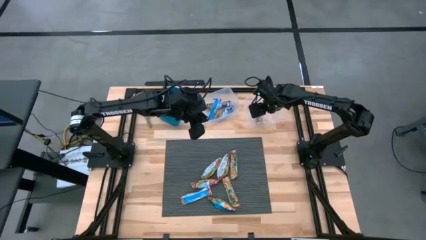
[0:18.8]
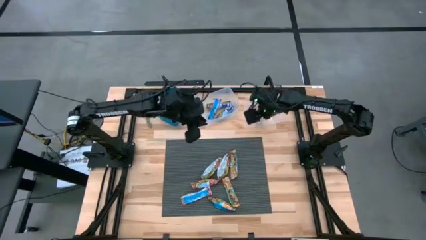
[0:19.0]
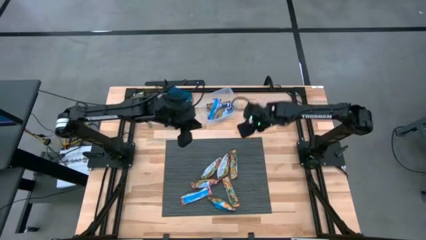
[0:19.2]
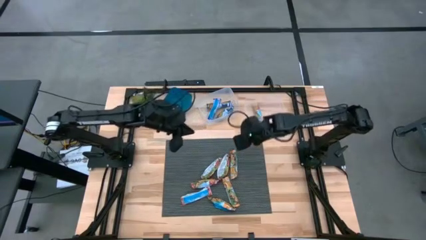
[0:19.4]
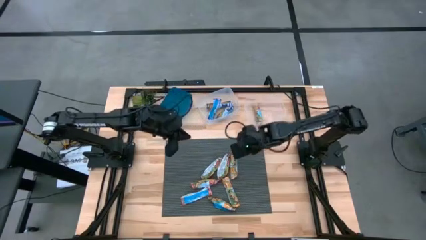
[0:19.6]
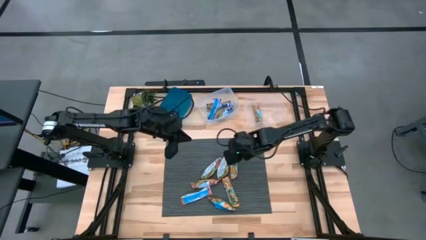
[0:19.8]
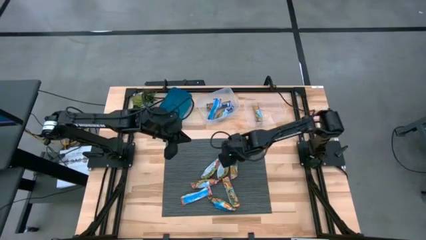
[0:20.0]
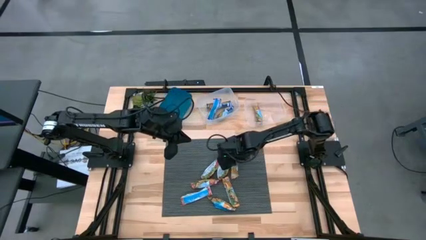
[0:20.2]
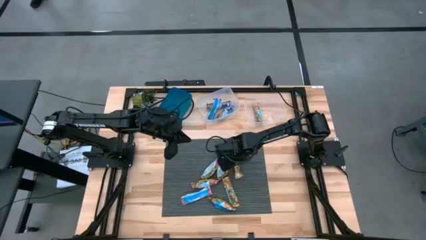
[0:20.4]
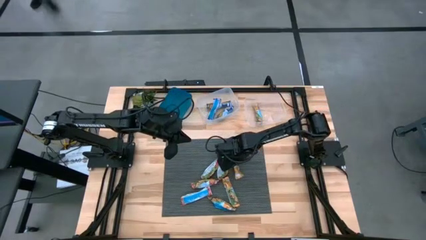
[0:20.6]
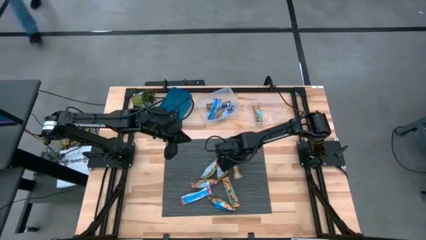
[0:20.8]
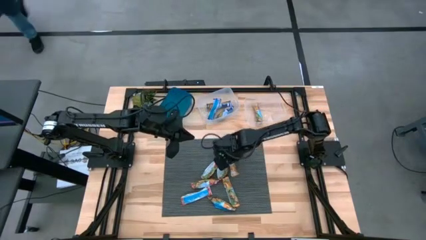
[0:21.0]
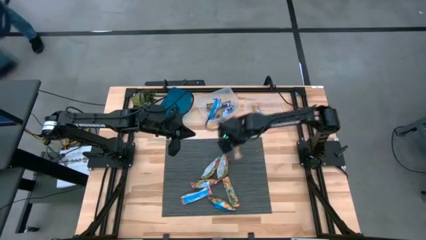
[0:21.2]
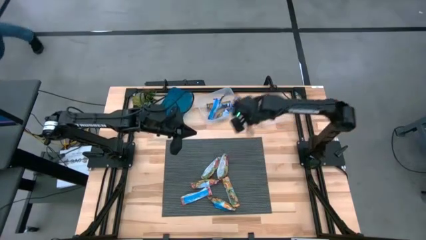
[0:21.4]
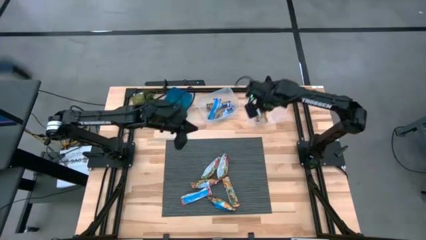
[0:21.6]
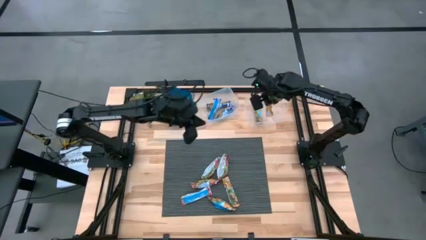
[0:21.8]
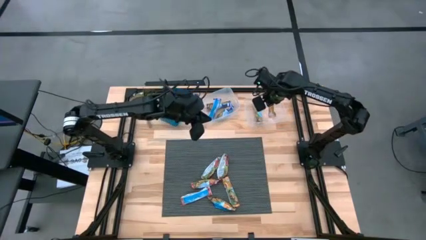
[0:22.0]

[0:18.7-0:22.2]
Task: Pick and place Granola Bars by type
Put the yellow granola bar into the right transparent bin

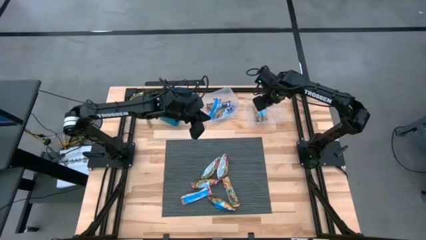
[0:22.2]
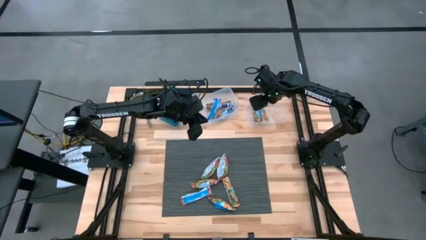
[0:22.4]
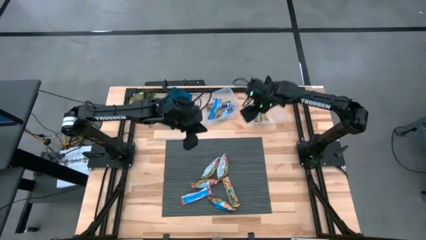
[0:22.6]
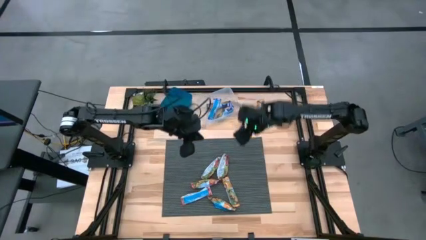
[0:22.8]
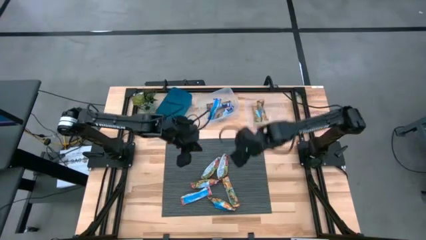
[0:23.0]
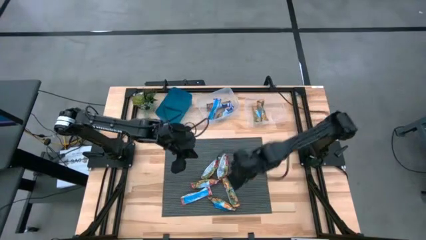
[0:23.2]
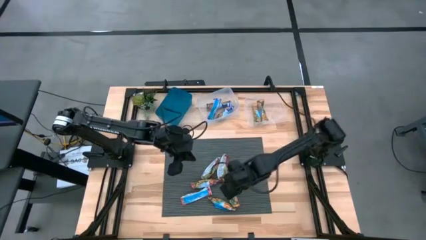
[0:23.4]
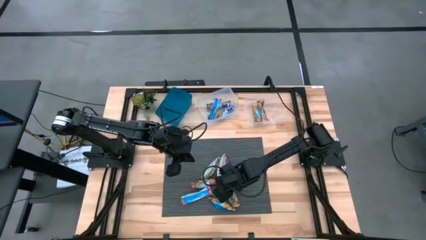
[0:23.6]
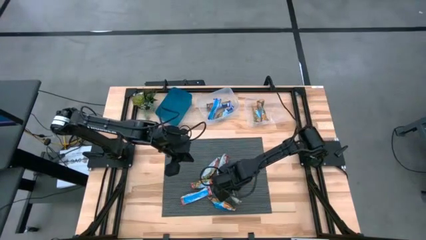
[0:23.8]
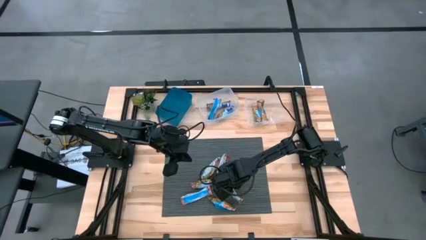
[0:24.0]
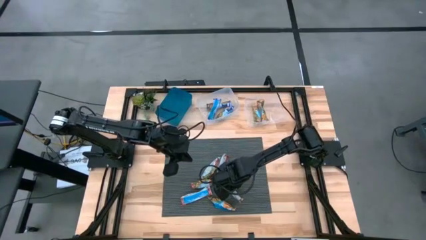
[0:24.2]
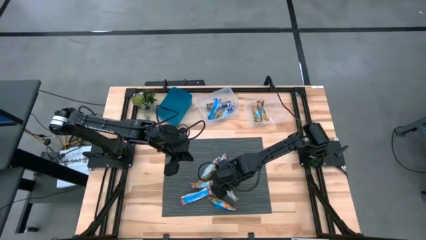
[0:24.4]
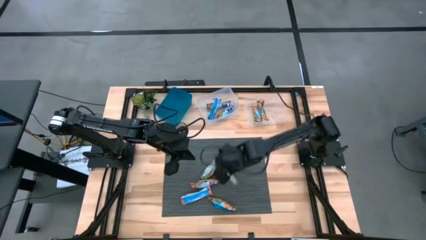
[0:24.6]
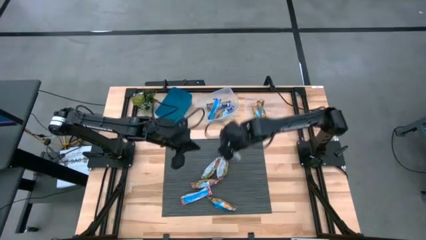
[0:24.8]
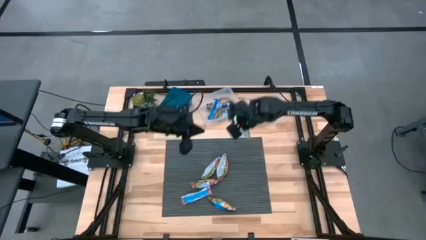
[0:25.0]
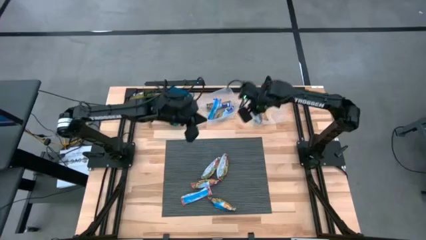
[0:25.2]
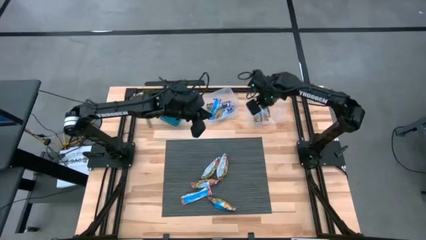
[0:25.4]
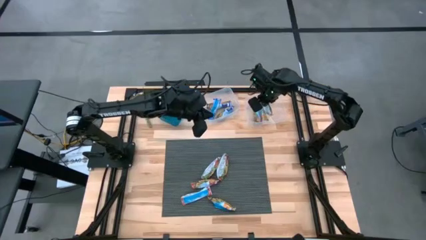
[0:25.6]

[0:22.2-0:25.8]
Put the yellow granola bar into the right transparent bin

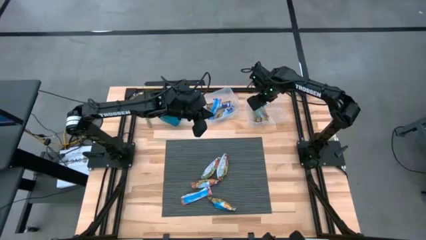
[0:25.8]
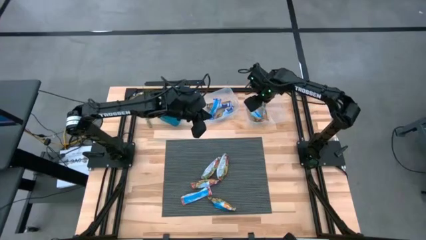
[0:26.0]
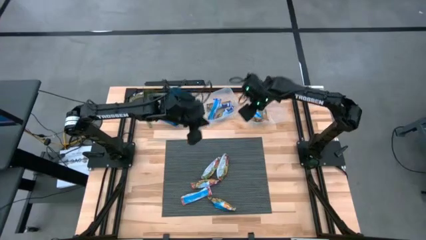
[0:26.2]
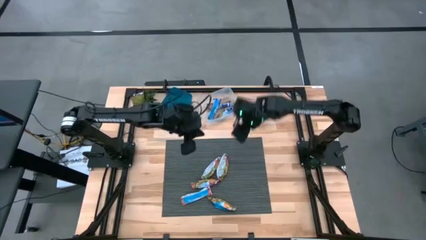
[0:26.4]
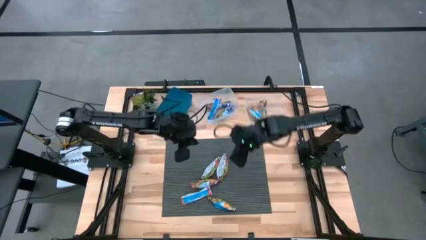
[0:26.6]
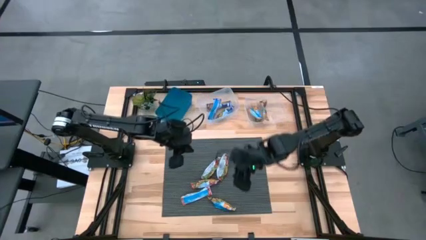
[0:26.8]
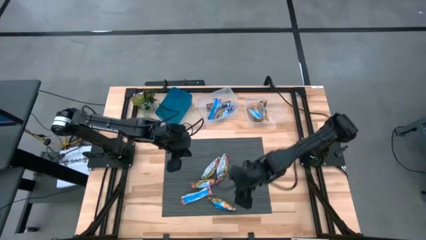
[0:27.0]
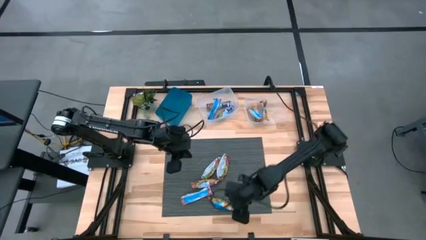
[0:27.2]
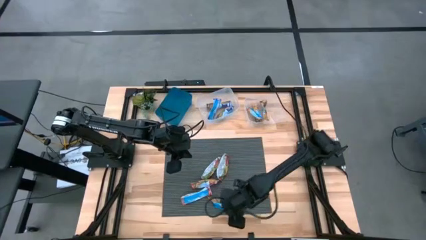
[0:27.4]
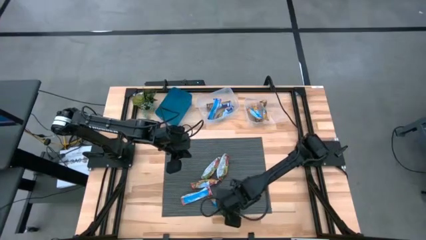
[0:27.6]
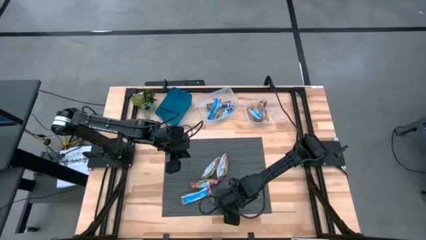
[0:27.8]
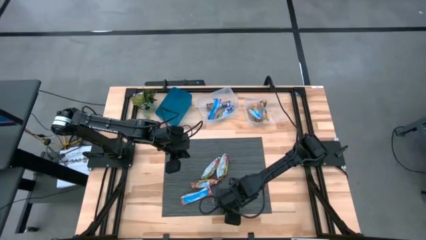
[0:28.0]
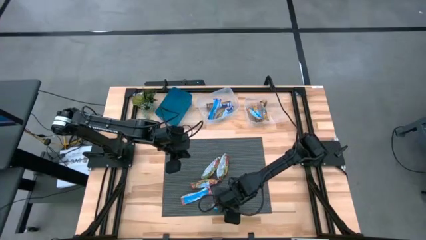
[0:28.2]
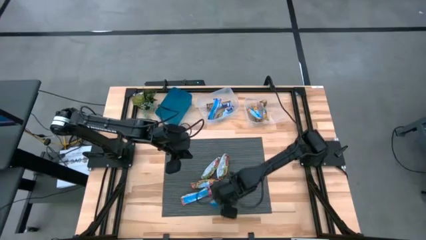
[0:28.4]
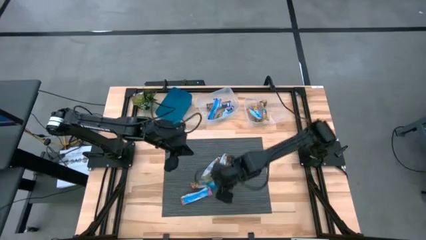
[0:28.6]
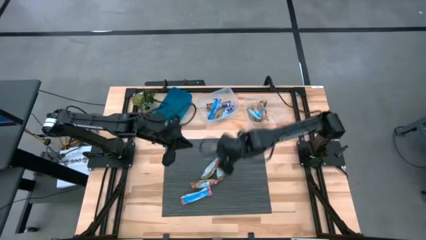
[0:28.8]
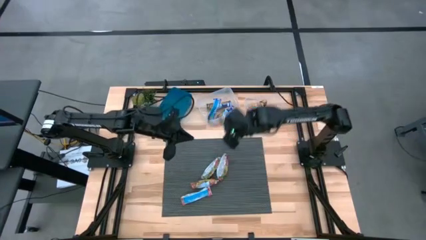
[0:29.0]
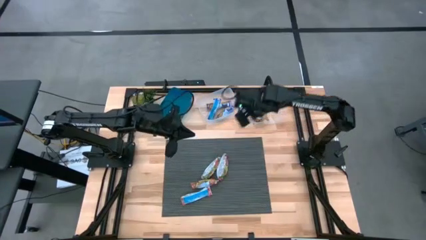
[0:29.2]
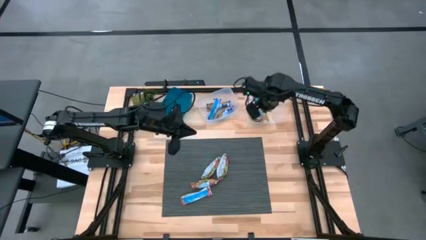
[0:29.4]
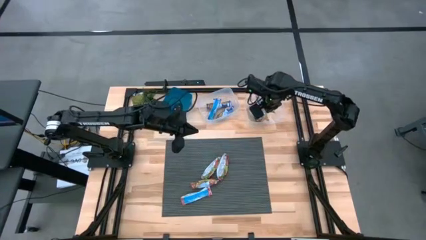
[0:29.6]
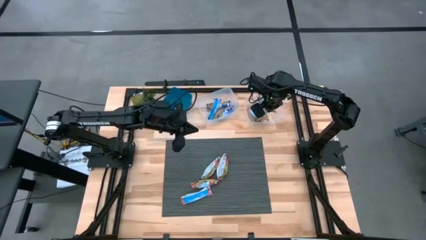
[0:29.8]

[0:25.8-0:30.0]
Put the yellow granola bar into the right transparent bin

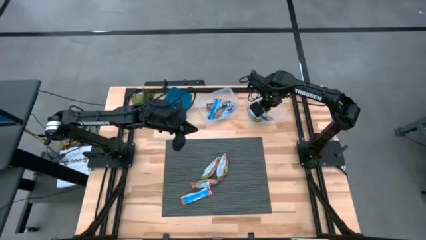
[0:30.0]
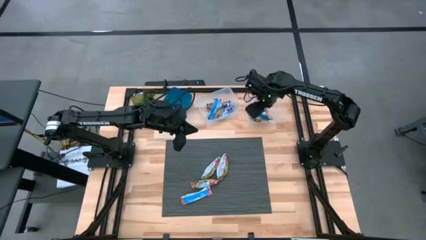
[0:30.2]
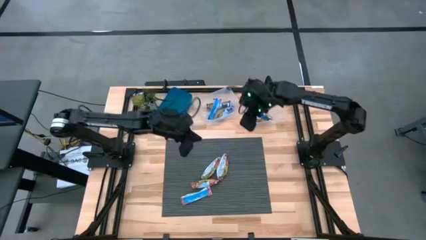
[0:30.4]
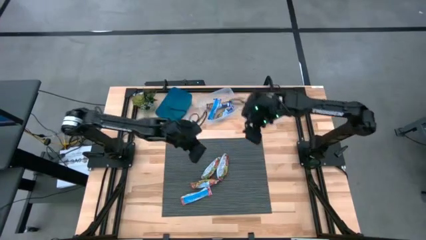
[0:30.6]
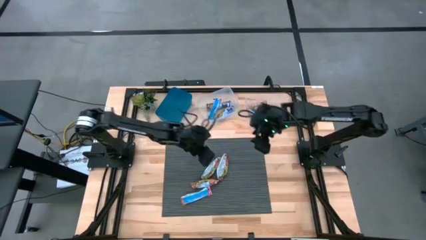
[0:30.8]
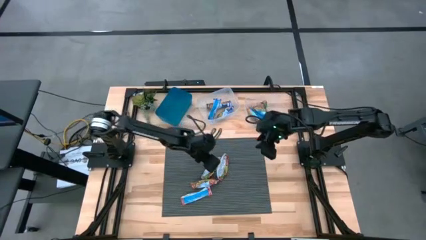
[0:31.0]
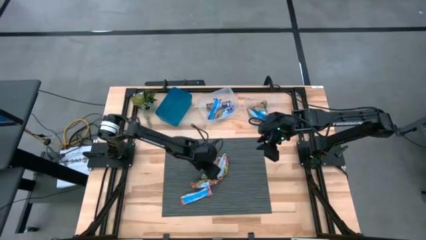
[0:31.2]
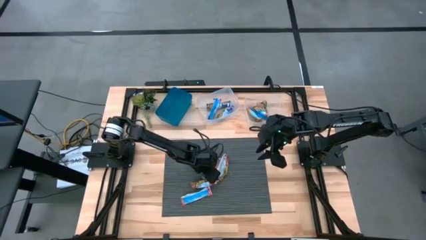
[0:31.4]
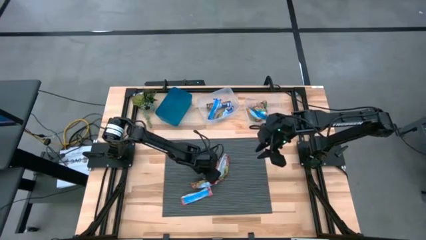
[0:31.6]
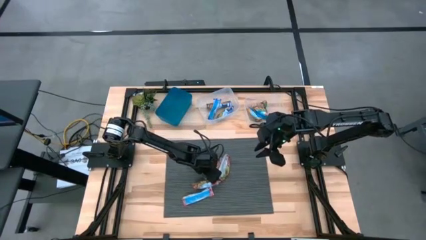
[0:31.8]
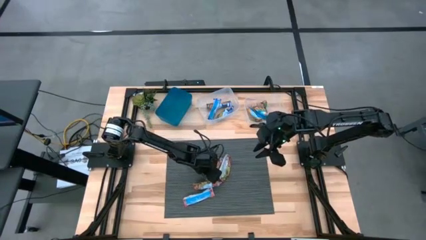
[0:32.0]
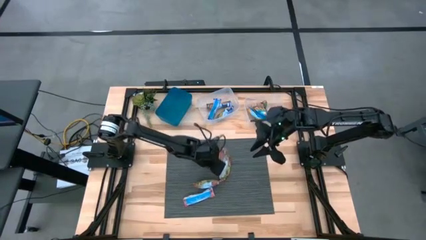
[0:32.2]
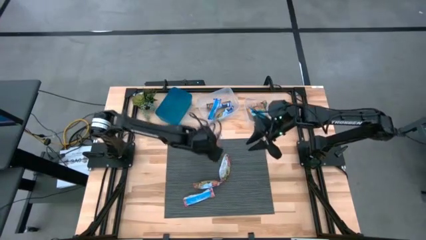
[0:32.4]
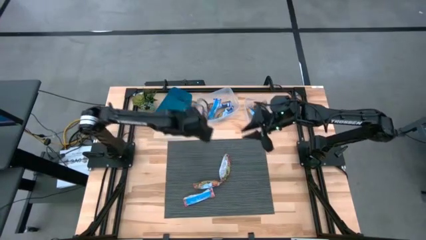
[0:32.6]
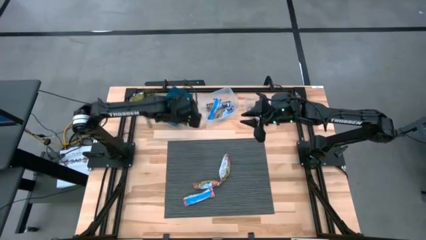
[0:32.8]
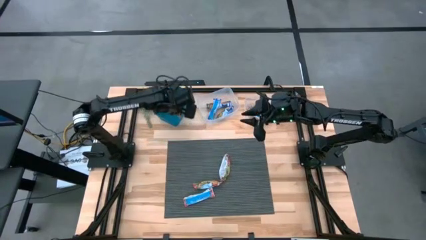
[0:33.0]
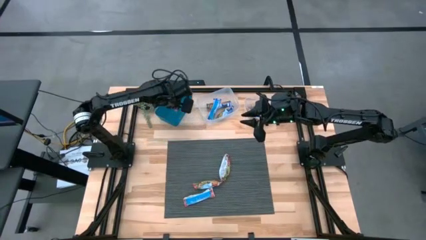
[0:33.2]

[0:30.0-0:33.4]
Put the red granola bar into the blue bin

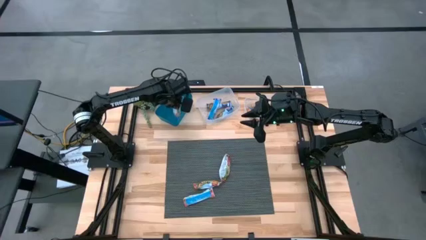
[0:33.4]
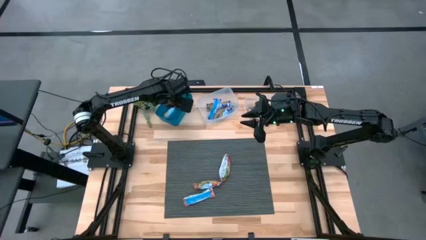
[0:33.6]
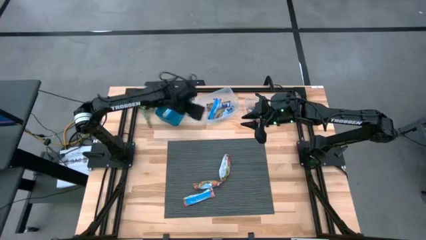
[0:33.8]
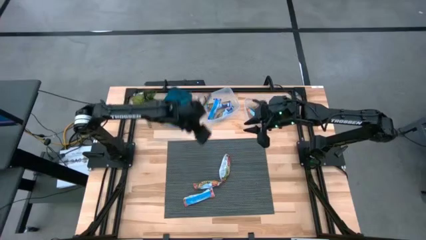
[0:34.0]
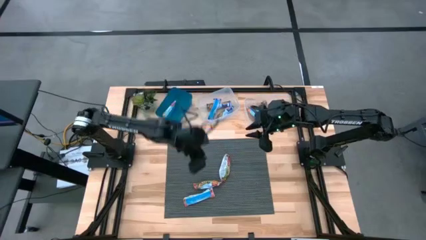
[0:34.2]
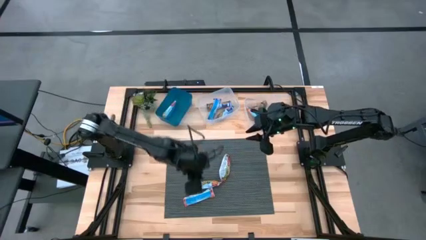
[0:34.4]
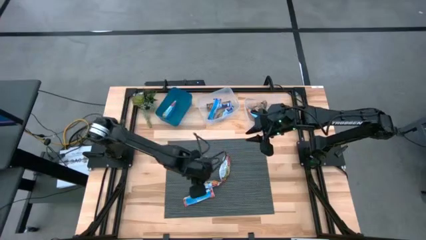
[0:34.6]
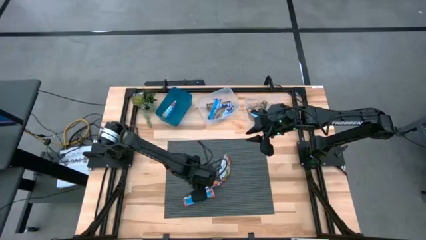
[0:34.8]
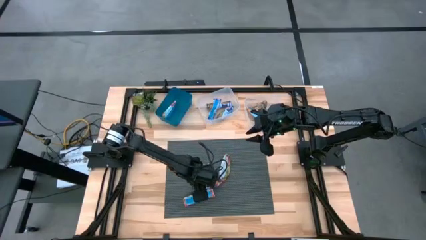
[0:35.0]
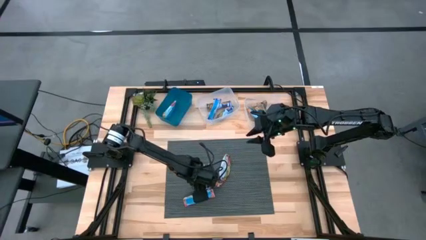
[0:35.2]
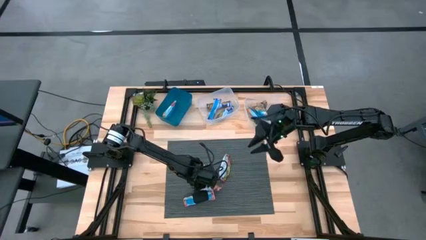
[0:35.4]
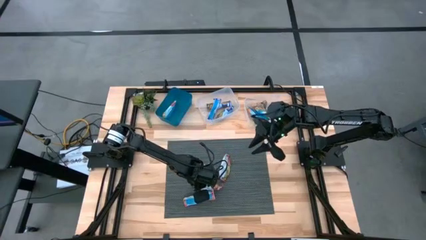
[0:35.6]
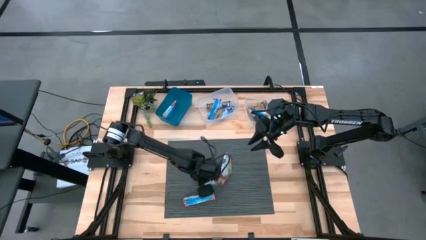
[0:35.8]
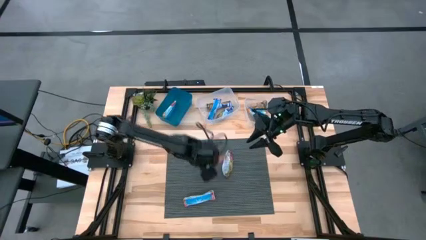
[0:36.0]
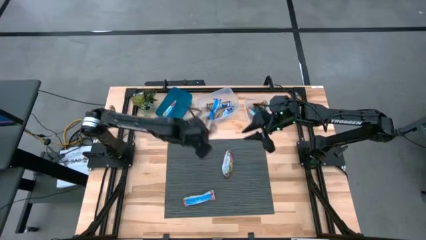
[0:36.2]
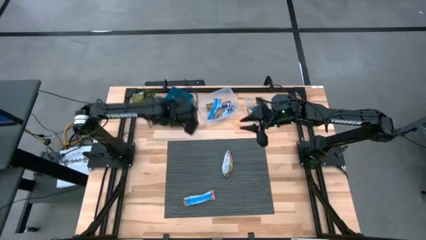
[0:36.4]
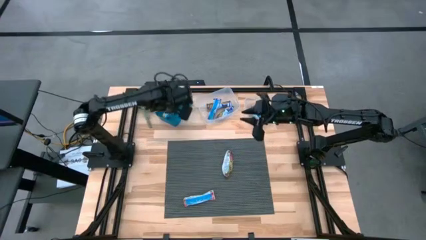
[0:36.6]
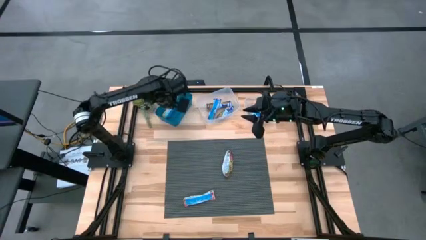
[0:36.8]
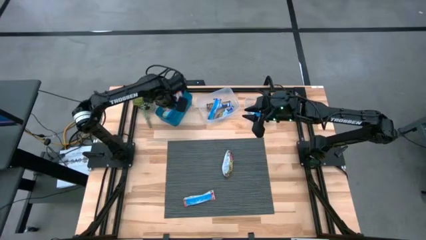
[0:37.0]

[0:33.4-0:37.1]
Put the red granola bar into the blue bin
